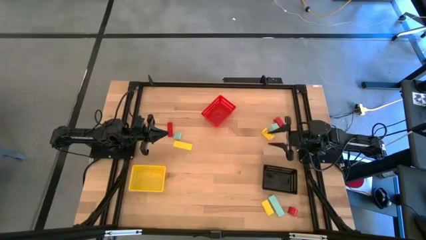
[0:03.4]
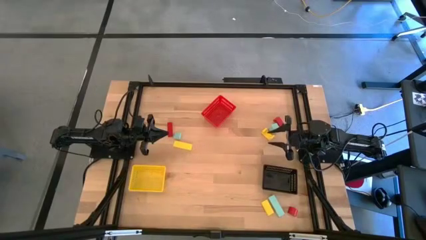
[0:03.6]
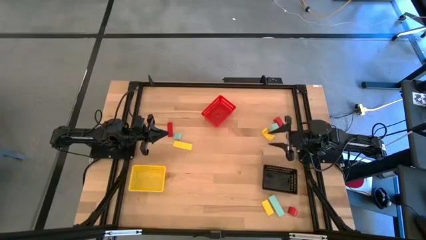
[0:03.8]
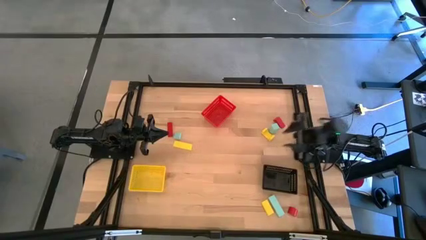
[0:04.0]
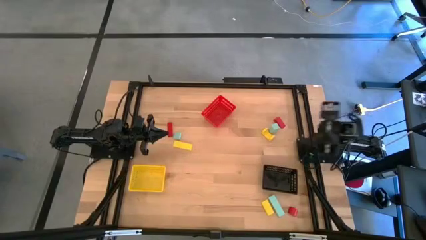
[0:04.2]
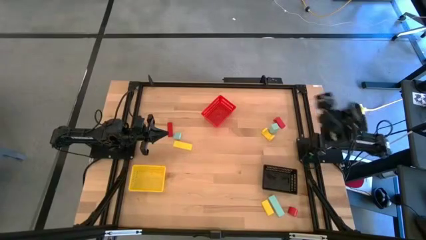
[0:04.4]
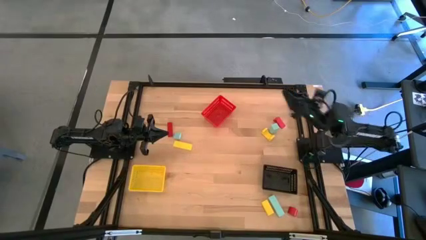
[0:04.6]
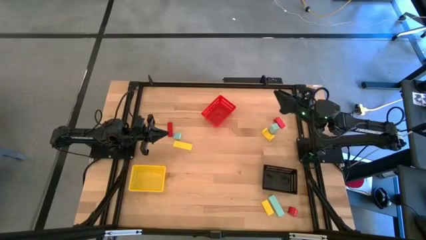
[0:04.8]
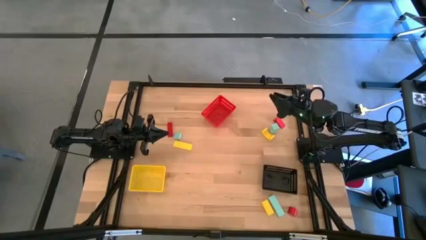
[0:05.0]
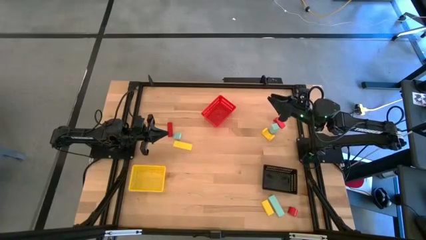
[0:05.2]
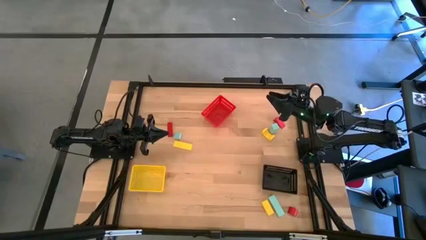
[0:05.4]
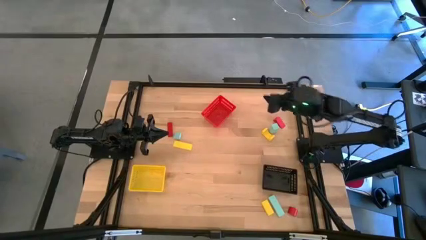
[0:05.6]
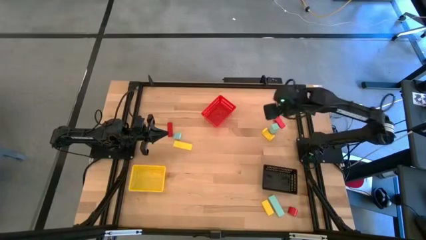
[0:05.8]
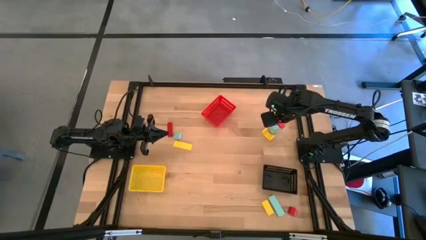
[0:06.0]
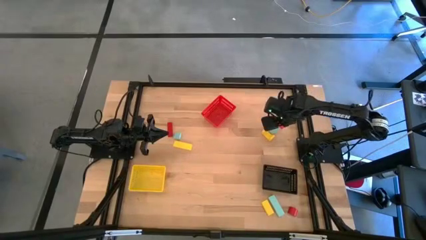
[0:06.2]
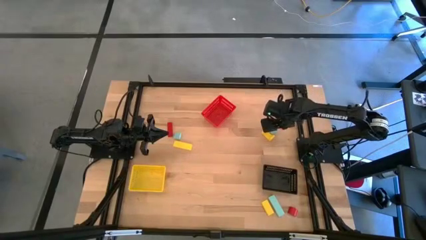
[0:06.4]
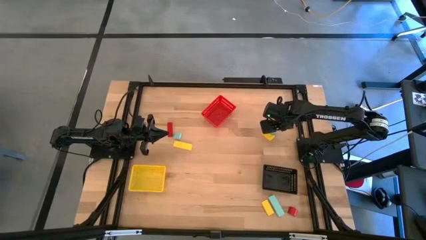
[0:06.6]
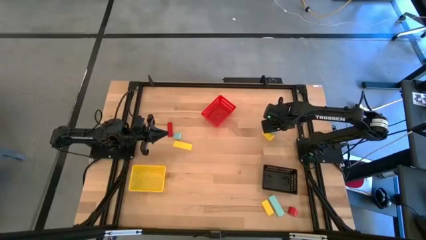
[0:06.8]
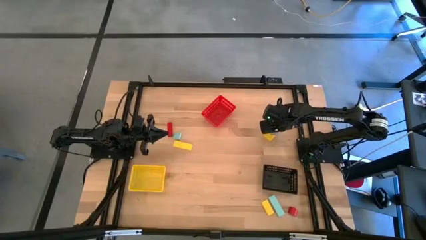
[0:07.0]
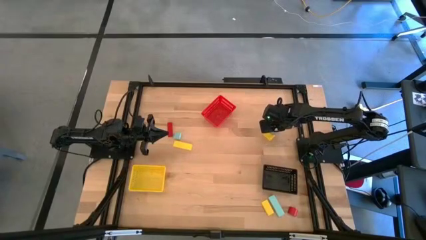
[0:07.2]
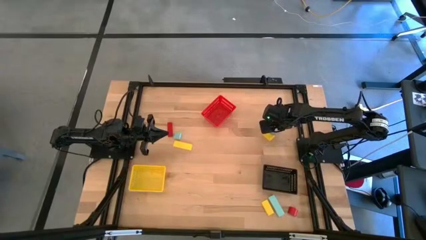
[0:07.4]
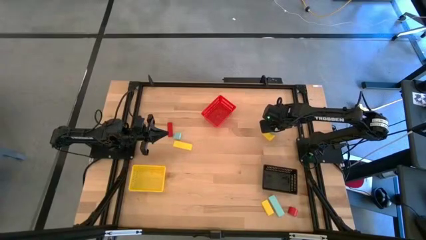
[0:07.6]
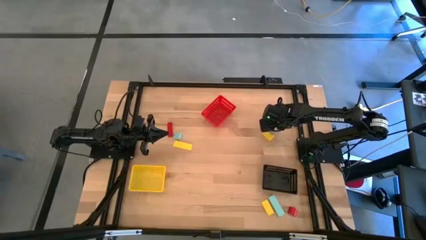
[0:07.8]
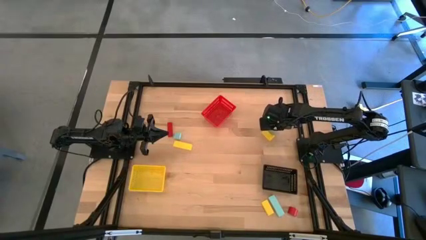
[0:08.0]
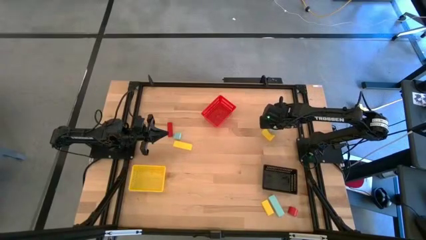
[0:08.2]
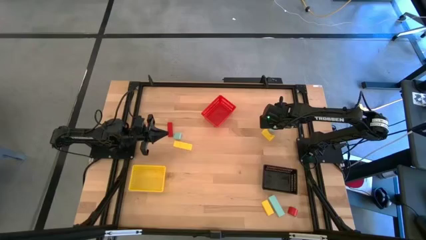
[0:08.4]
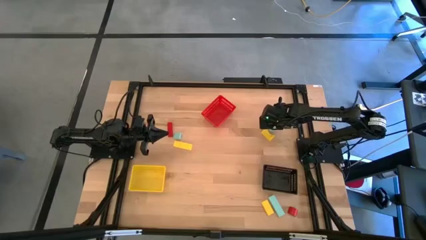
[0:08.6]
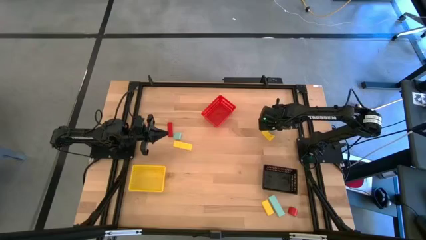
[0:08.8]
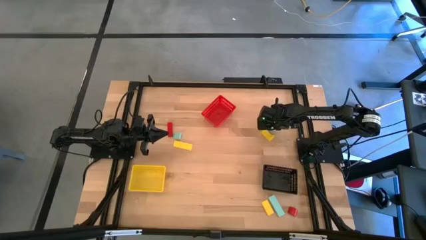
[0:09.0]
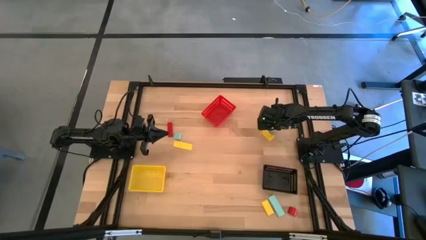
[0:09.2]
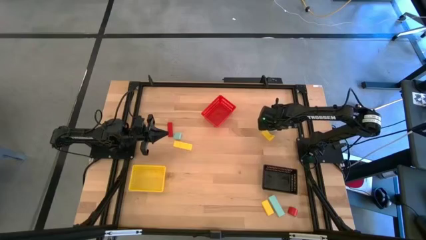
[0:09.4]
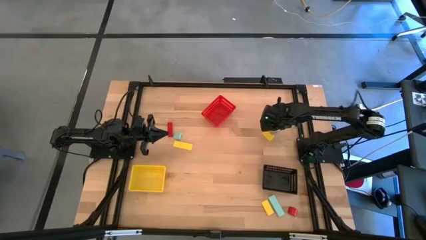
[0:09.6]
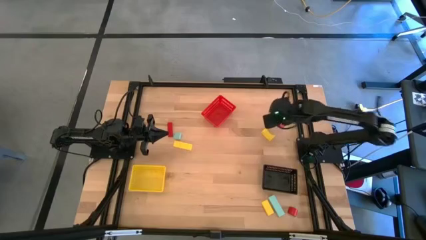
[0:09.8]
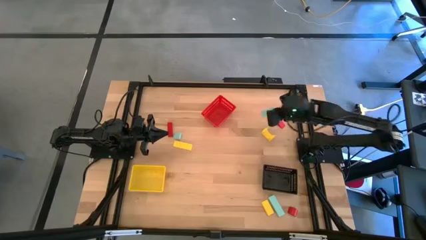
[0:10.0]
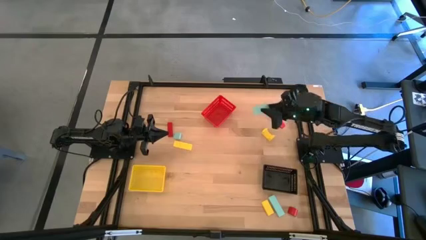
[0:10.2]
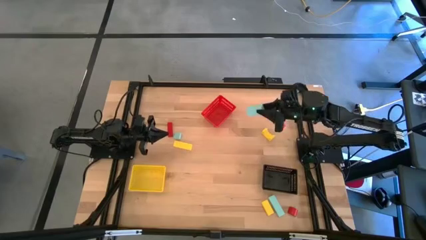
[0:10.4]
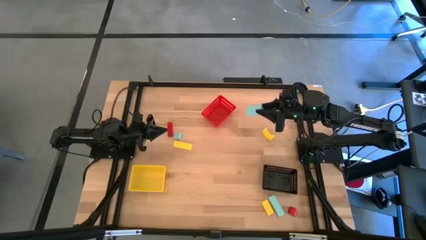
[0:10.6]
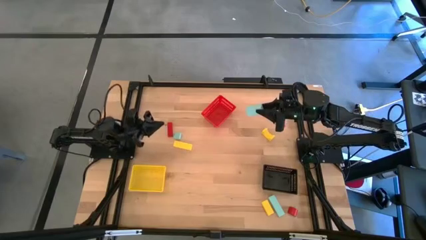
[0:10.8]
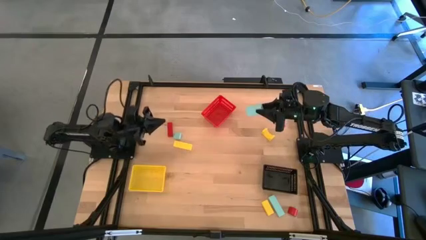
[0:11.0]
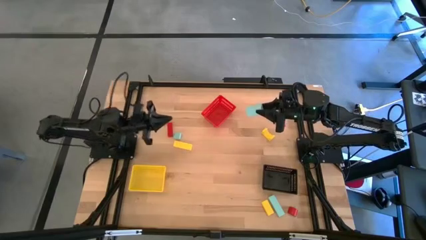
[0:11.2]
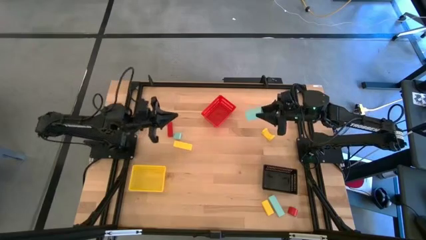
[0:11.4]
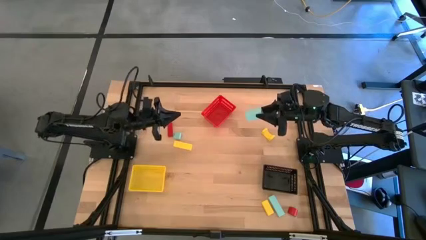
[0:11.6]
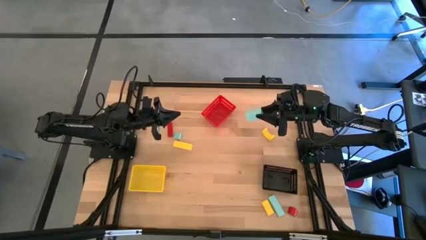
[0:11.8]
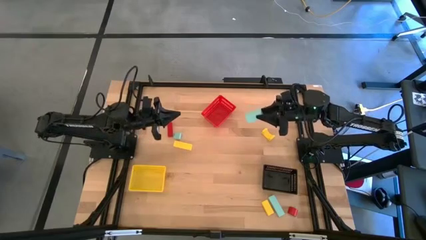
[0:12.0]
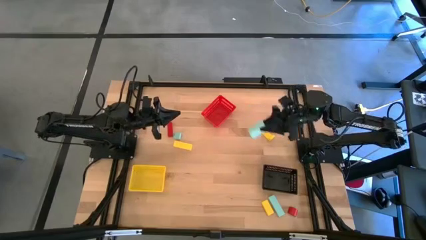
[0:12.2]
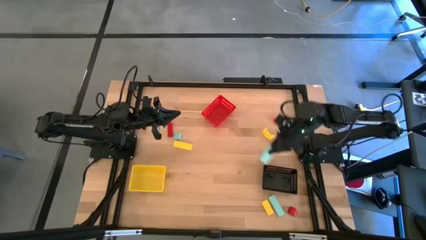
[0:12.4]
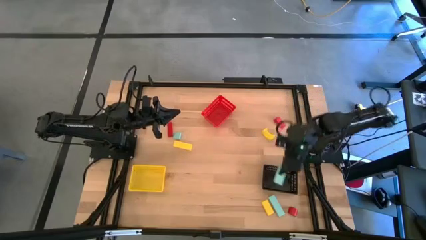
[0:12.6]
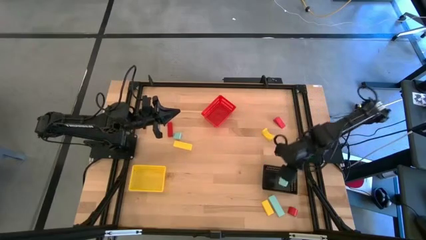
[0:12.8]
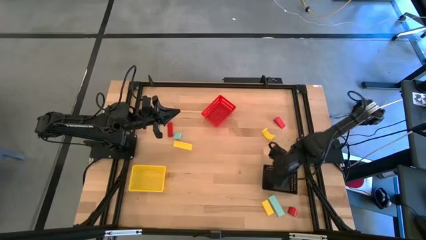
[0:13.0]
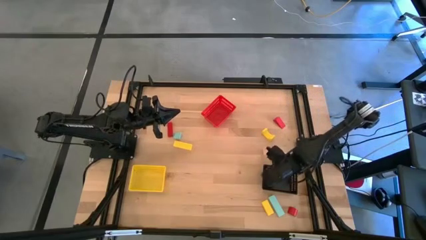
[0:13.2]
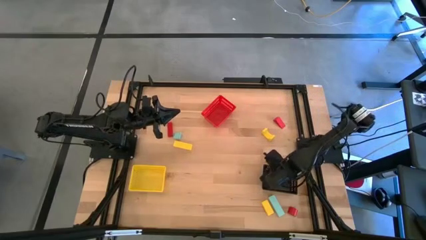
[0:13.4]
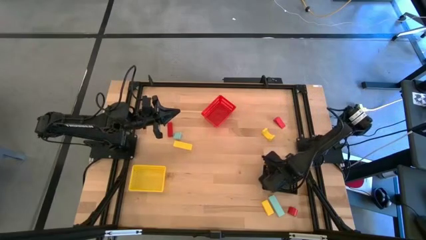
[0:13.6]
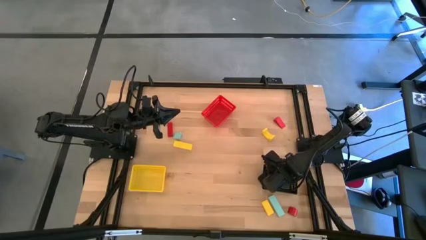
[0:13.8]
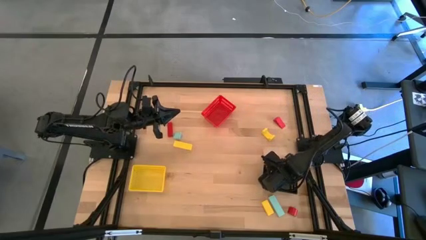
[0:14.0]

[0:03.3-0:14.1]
Task: Sort & place blocks by color
Put the top right light blue block into the black bin
